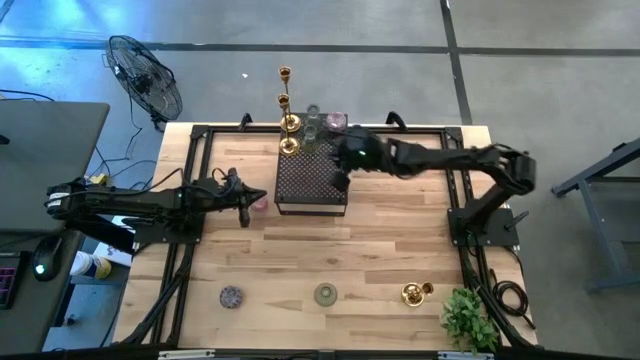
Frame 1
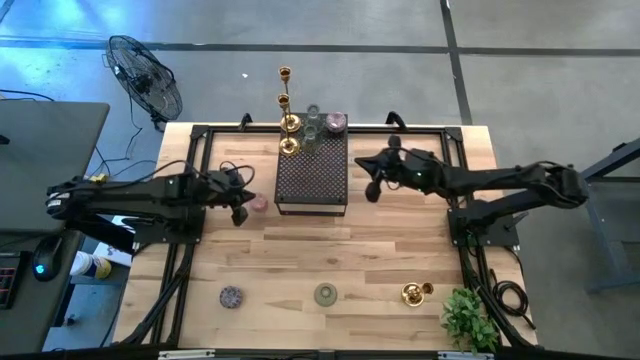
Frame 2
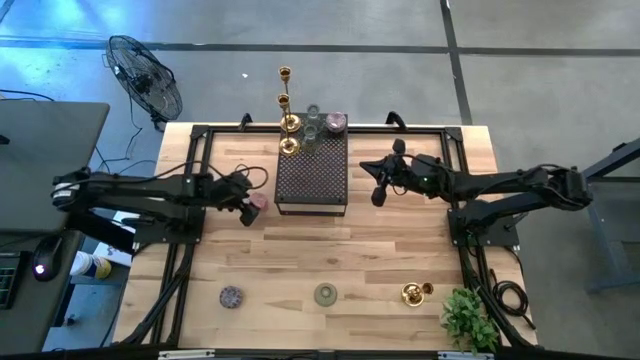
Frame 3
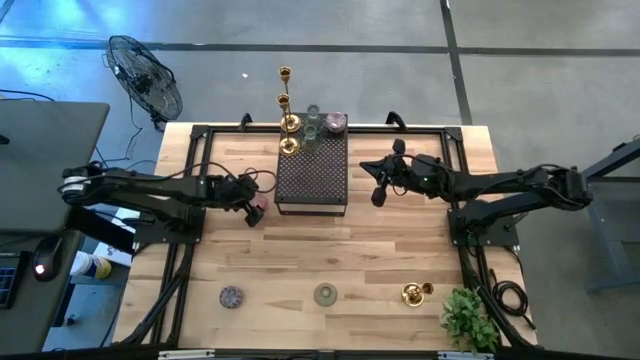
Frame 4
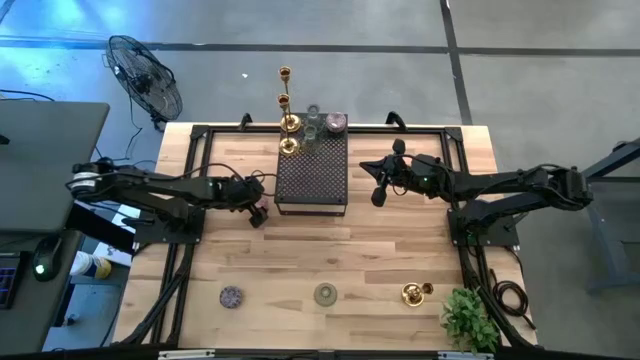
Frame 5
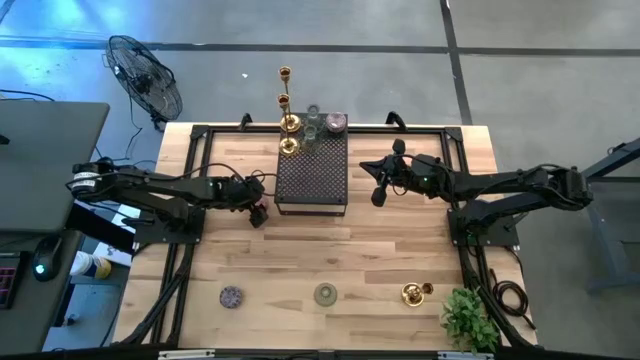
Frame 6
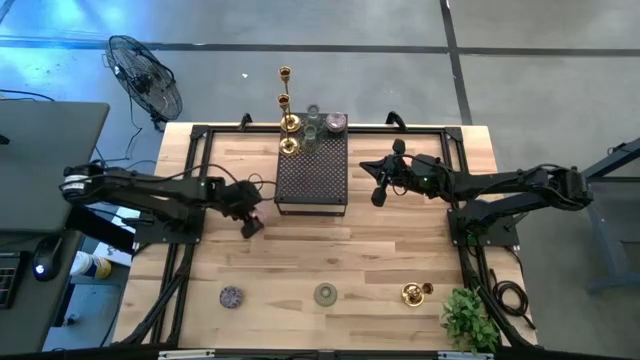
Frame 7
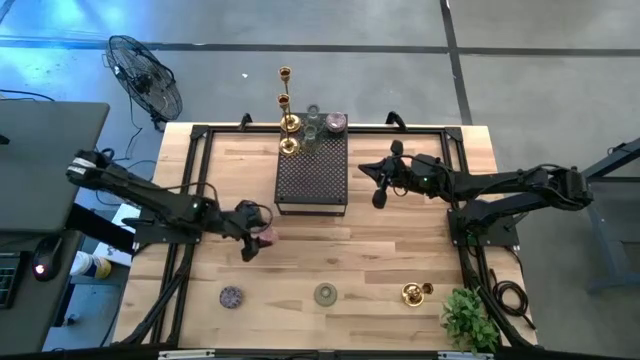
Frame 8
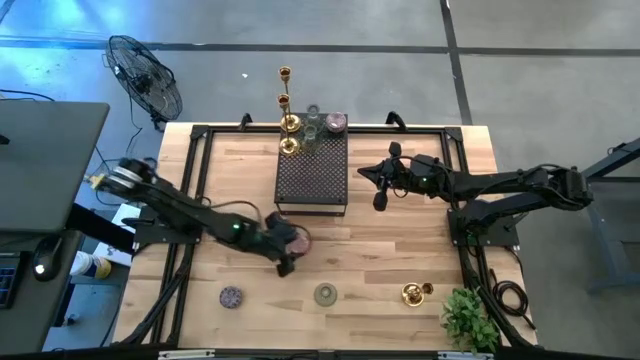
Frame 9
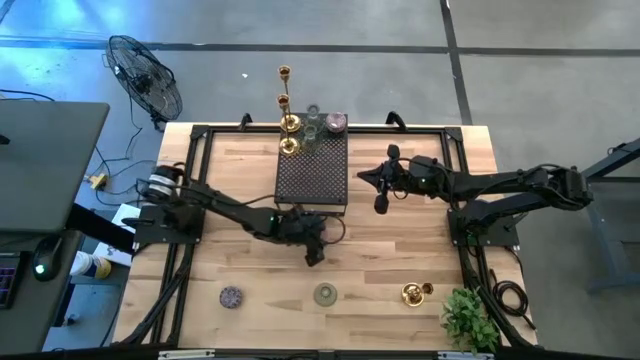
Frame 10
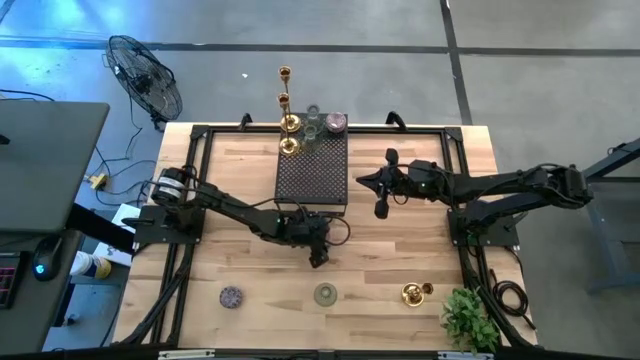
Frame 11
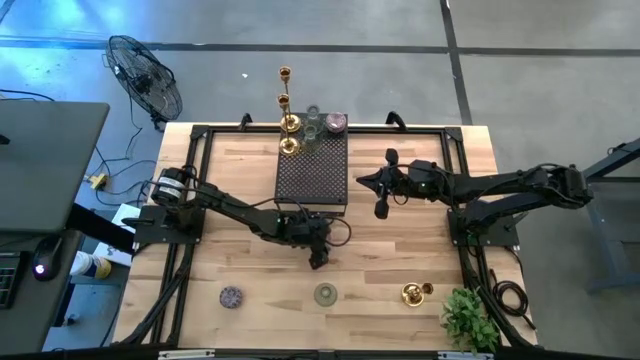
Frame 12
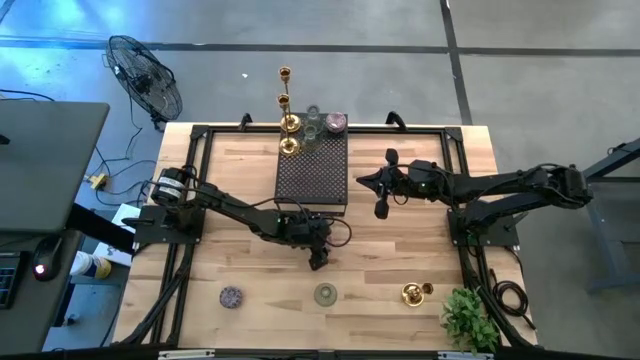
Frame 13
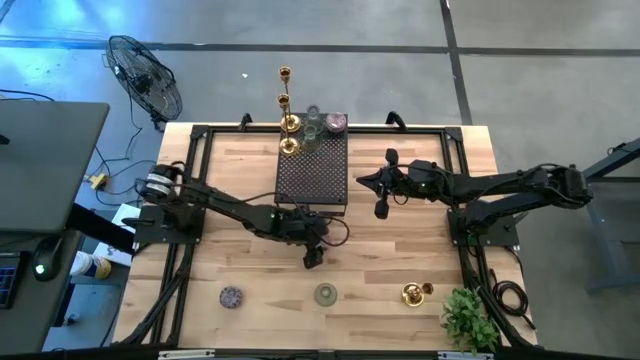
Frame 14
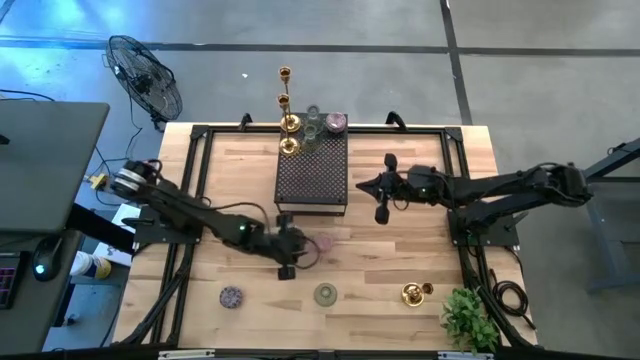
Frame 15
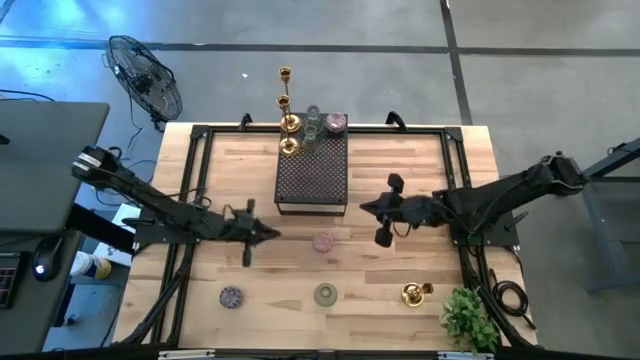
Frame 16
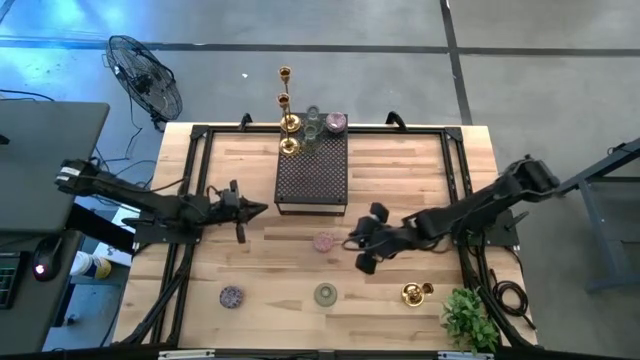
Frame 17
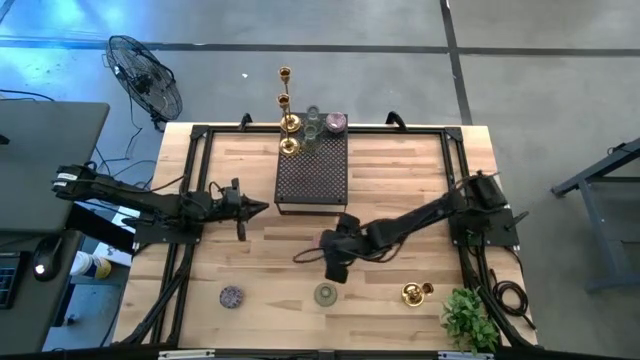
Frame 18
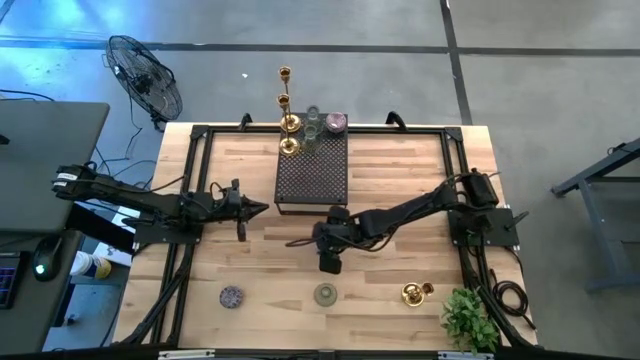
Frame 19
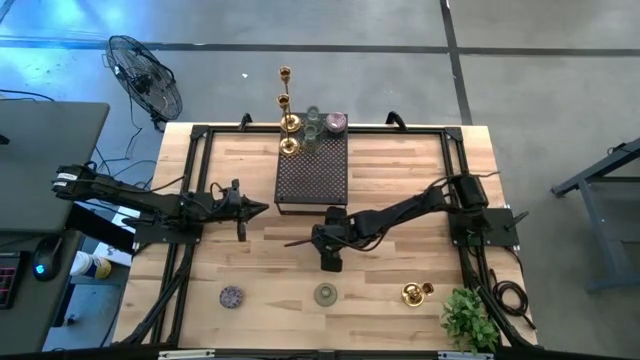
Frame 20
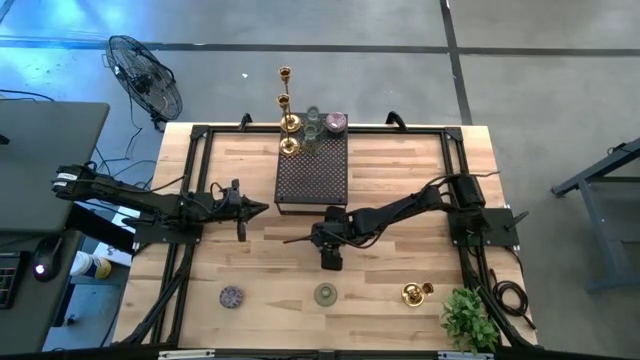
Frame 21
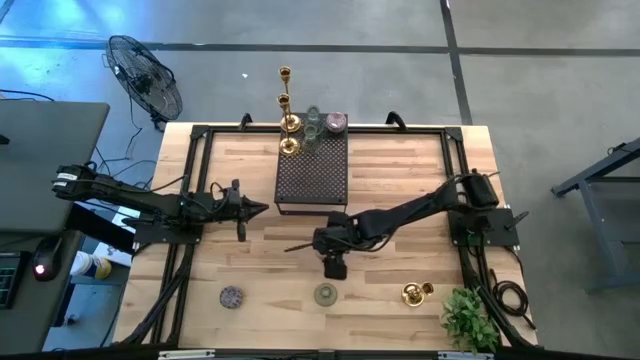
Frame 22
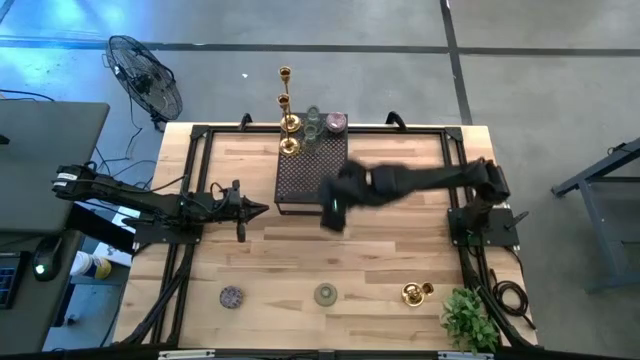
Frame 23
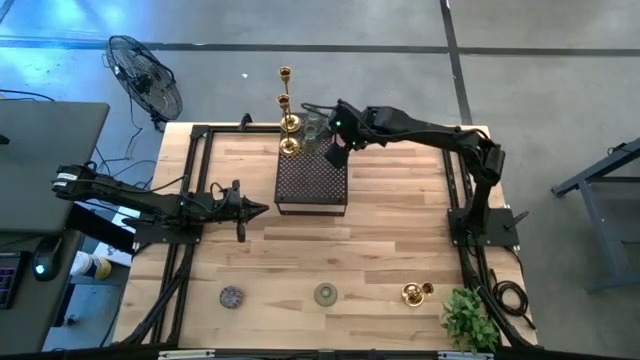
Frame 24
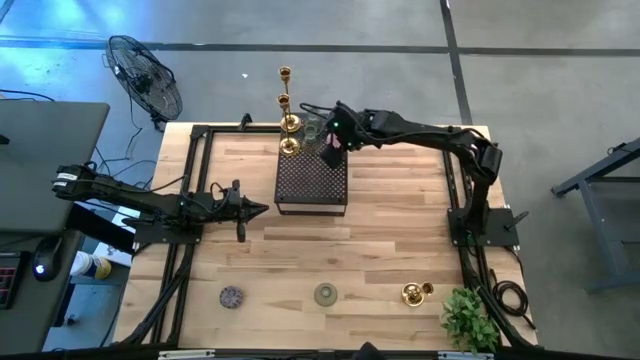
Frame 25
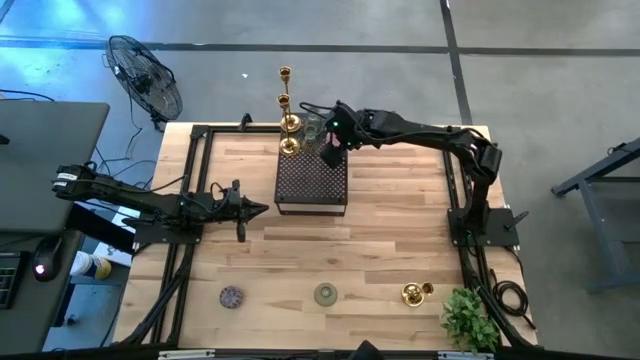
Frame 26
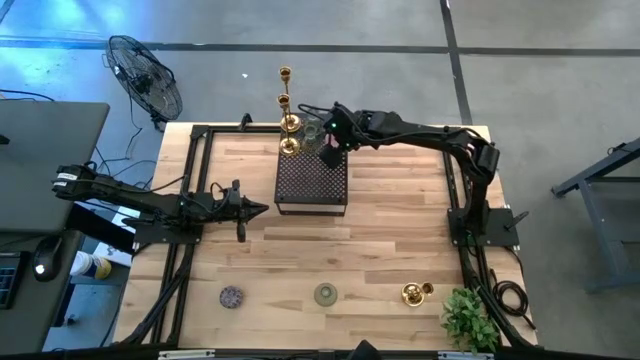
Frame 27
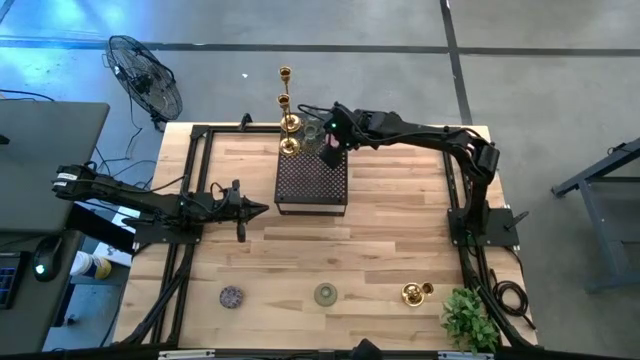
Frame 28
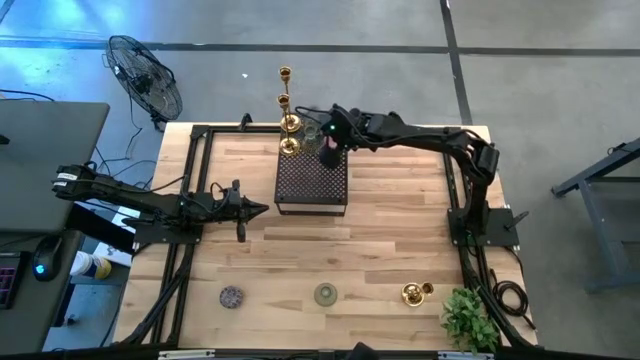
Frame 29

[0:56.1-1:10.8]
Task: Pick & Place candle stick holders
Put the pink patterned scented candle on the shelf

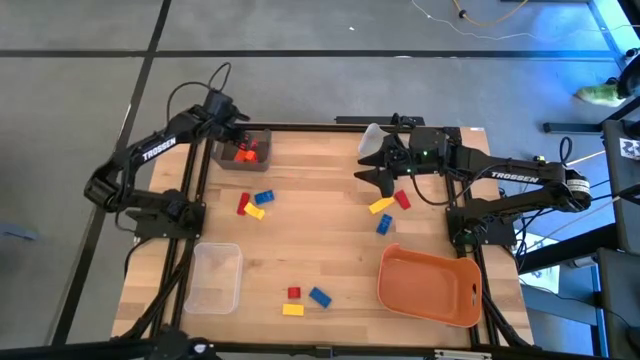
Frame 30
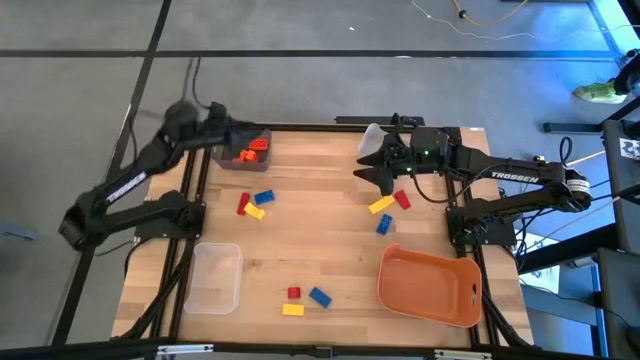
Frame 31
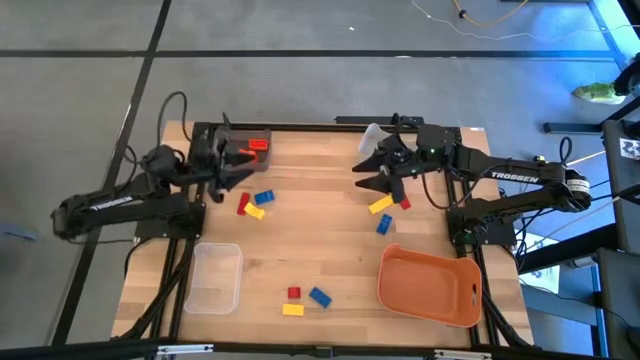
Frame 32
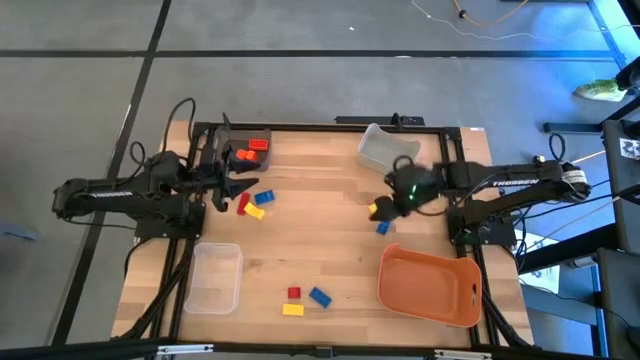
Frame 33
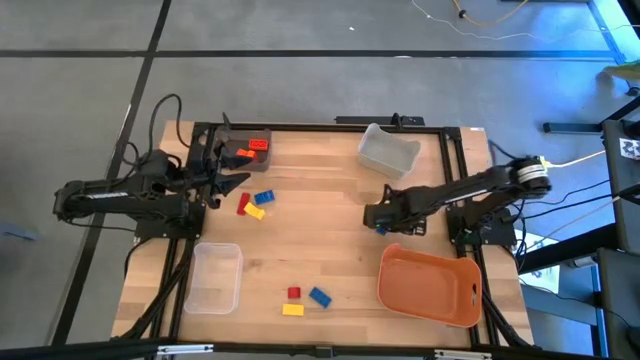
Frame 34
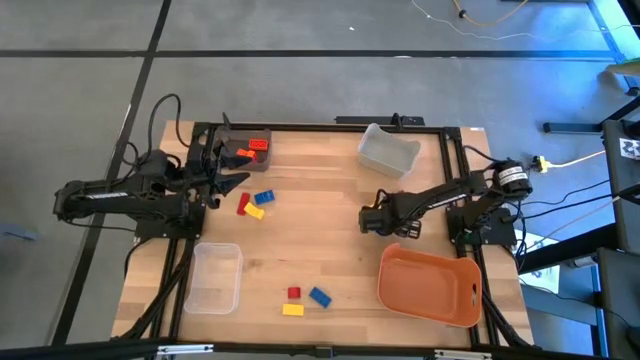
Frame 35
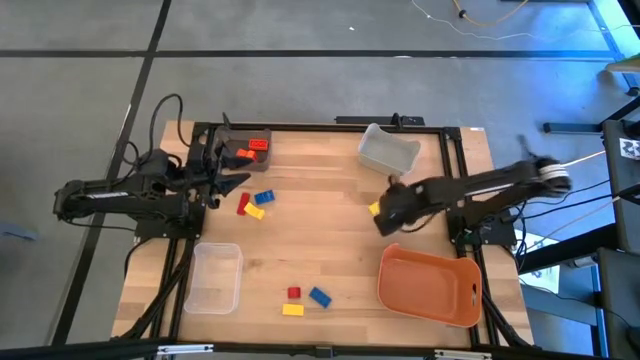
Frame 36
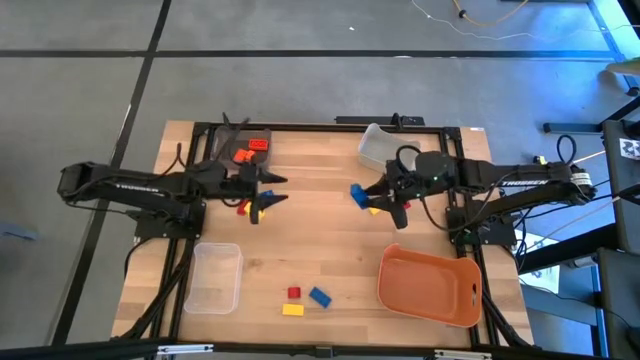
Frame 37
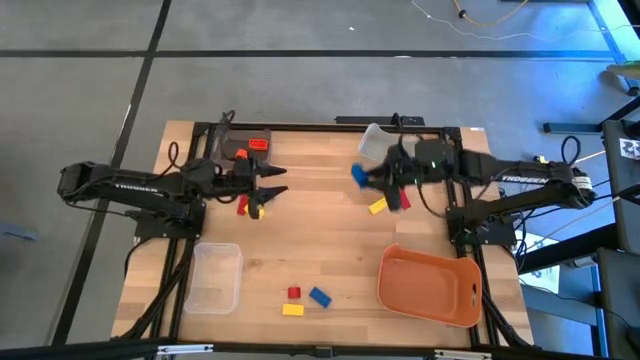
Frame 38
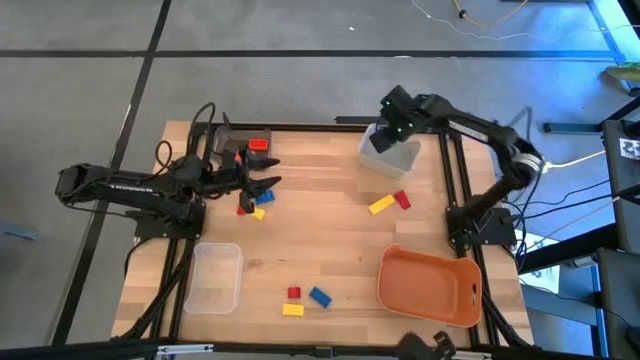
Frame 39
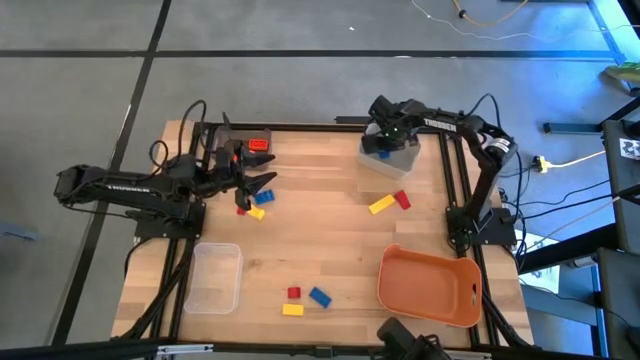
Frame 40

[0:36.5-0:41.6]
Task: Sort & place blocks by color
Put the top right blue gamepiece into the gray bin

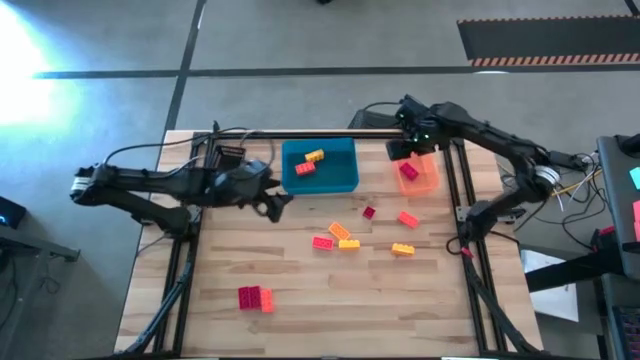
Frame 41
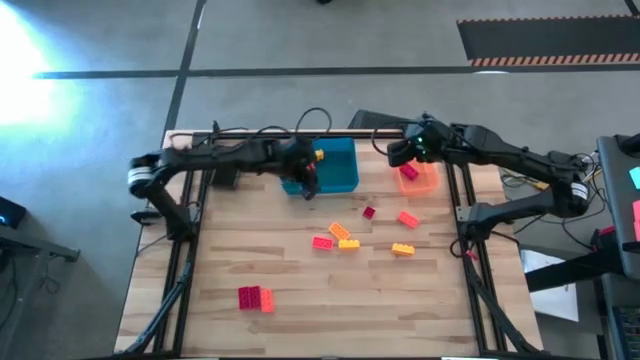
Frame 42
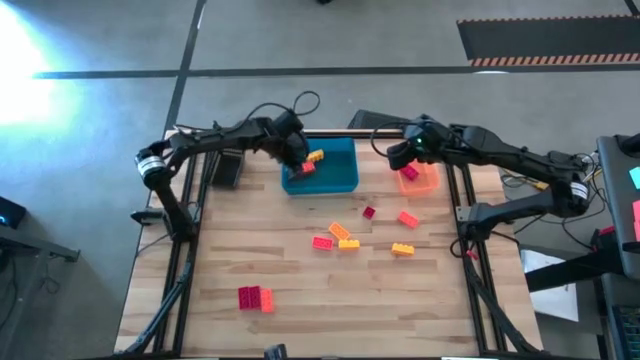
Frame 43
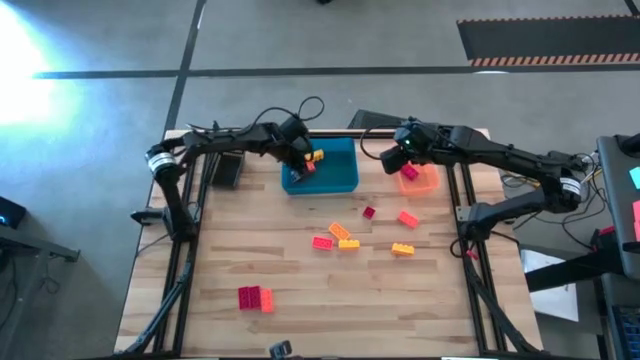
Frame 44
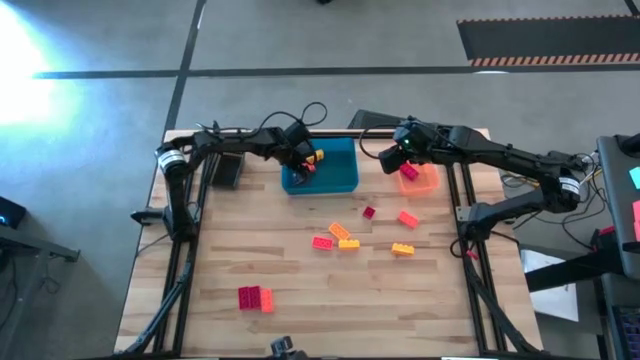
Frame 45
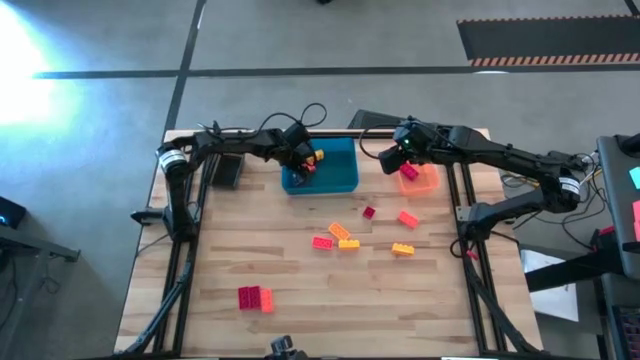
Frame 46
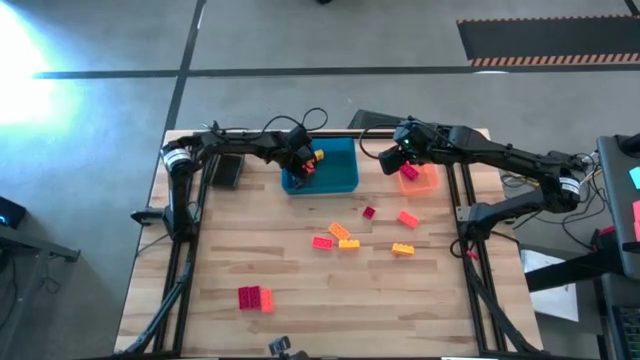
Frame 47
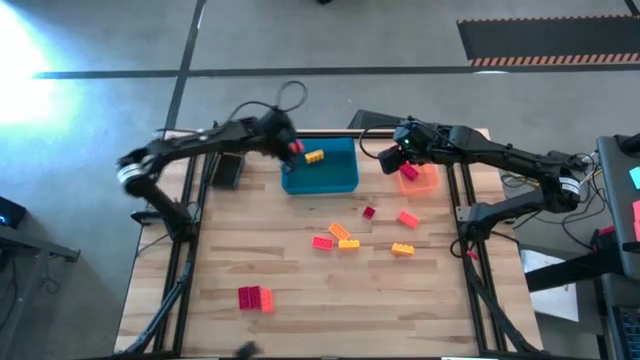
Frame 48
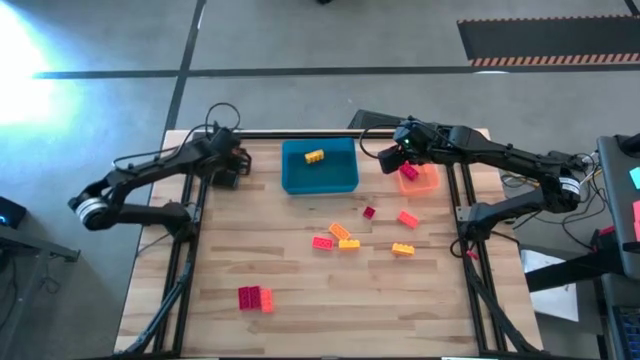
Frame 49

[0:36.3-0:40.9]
Task: Sort & place blocks by color
Put the orange game piece into the black bin
